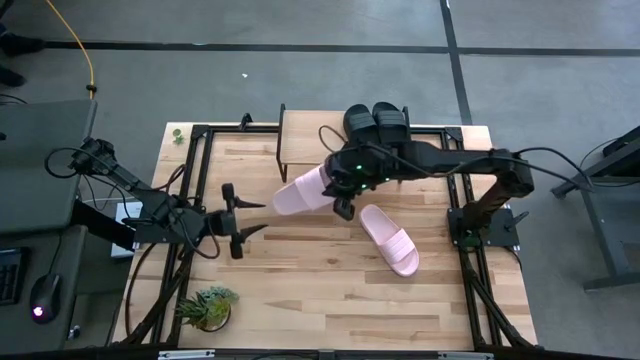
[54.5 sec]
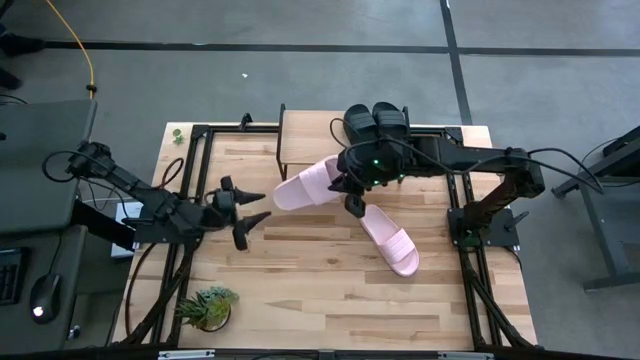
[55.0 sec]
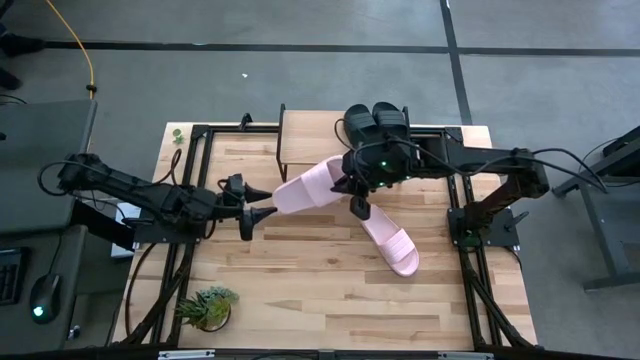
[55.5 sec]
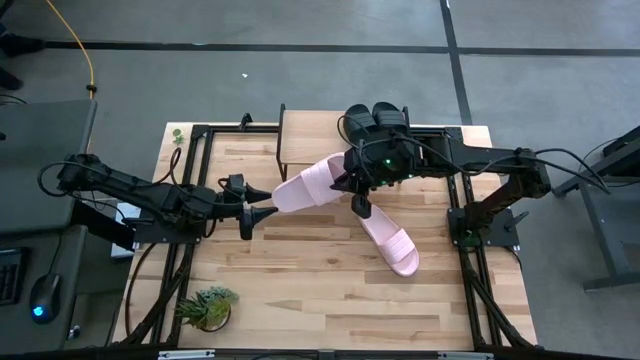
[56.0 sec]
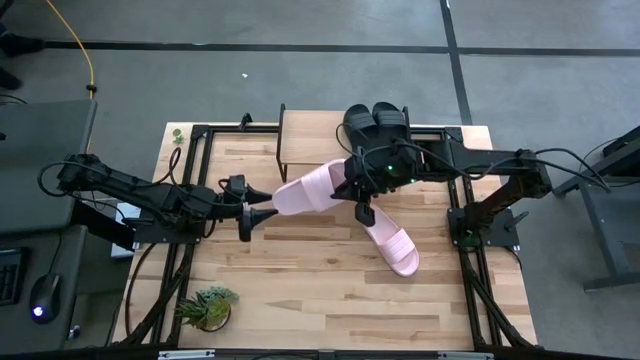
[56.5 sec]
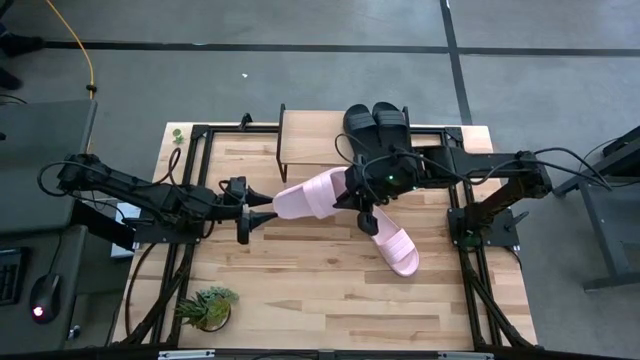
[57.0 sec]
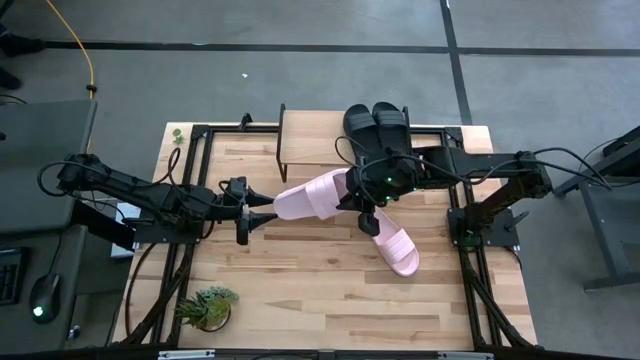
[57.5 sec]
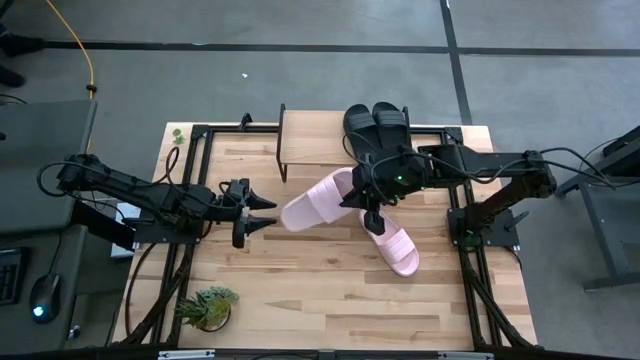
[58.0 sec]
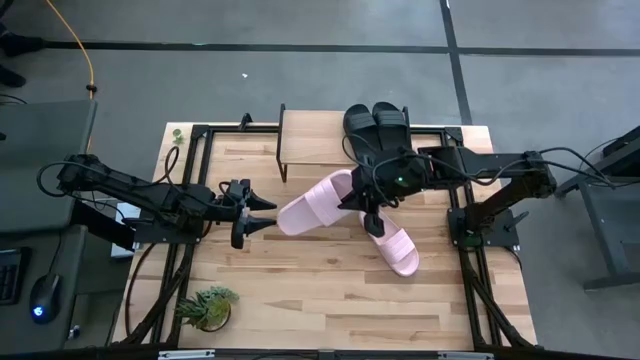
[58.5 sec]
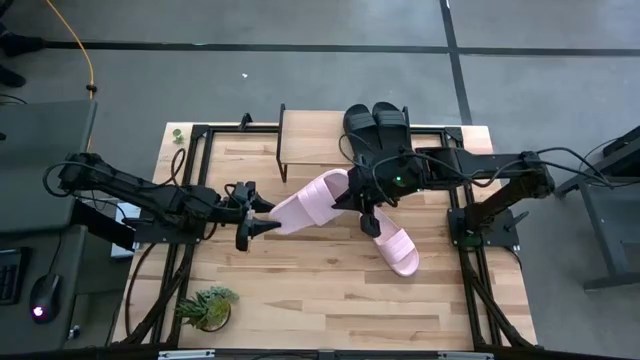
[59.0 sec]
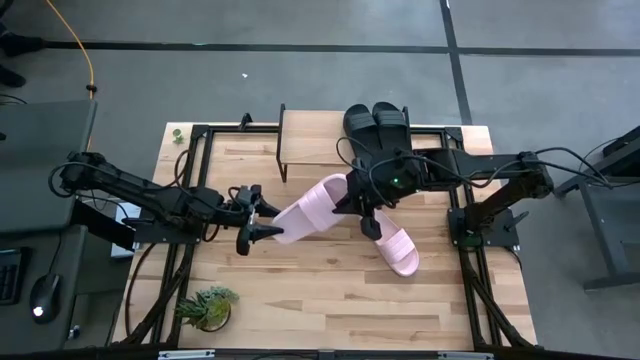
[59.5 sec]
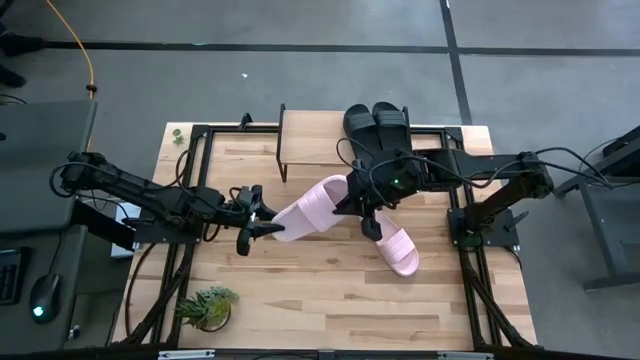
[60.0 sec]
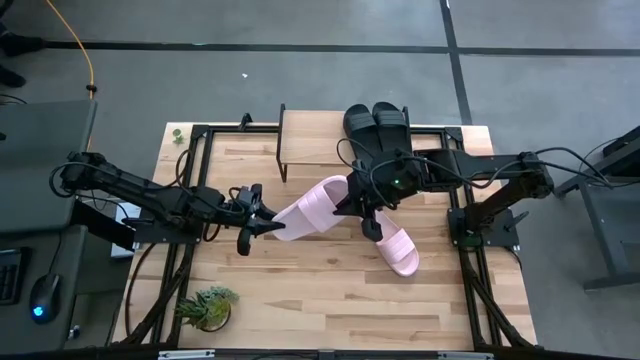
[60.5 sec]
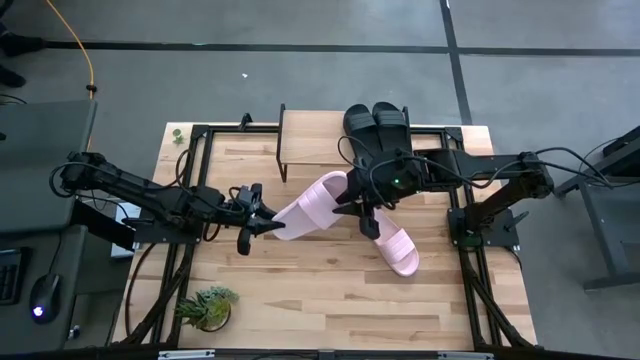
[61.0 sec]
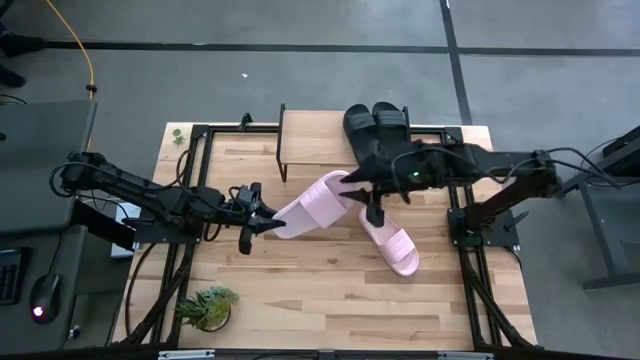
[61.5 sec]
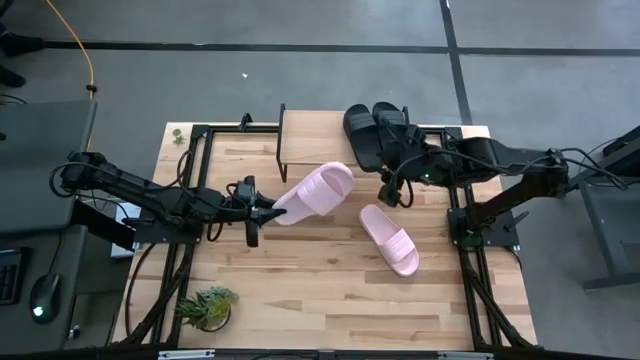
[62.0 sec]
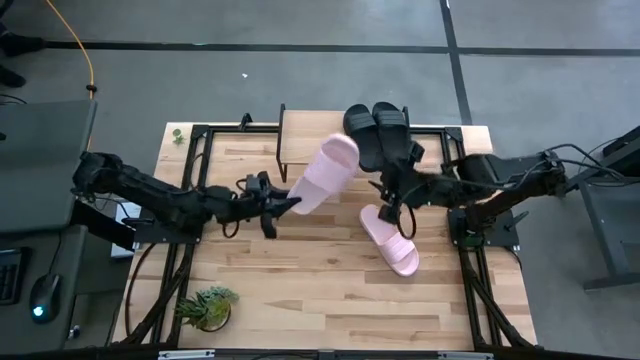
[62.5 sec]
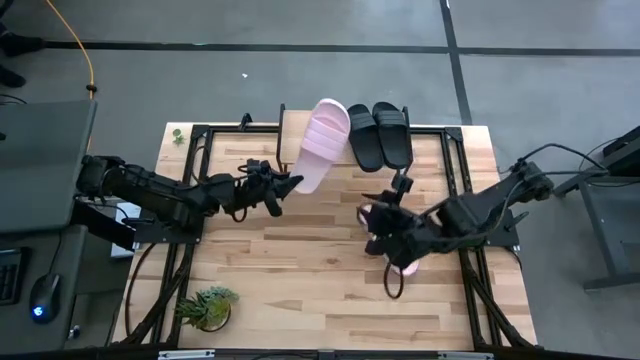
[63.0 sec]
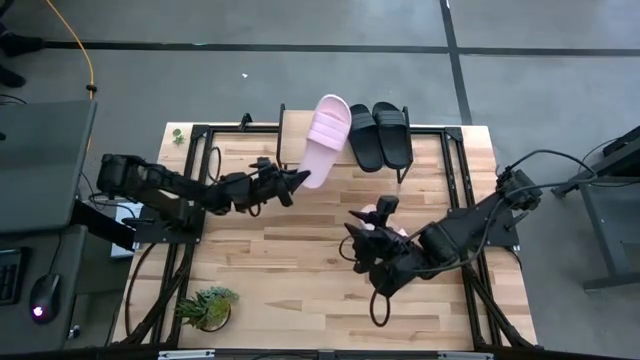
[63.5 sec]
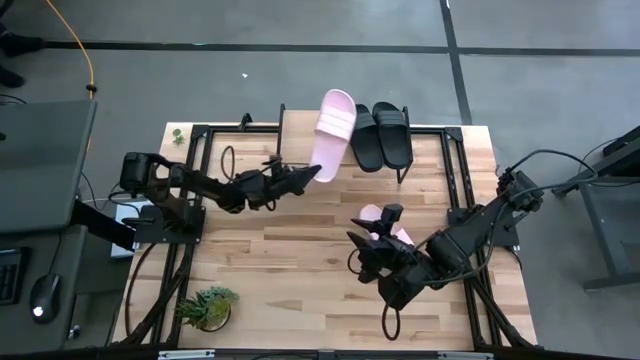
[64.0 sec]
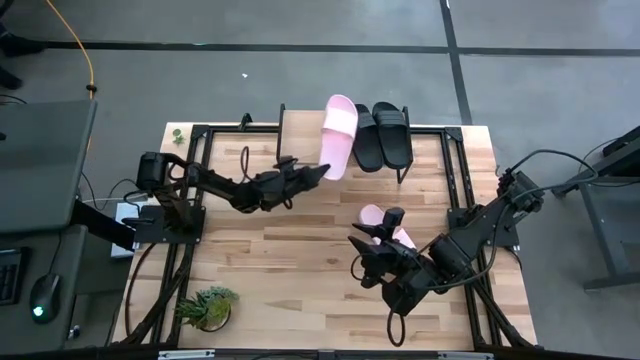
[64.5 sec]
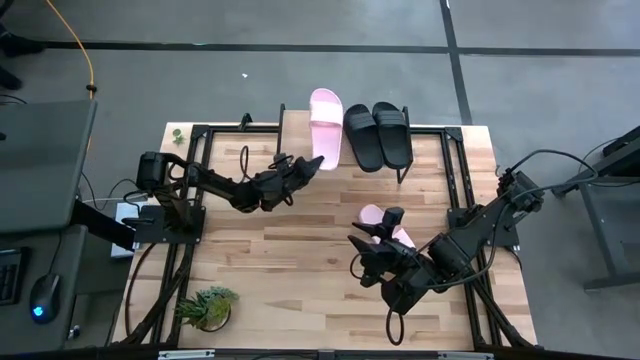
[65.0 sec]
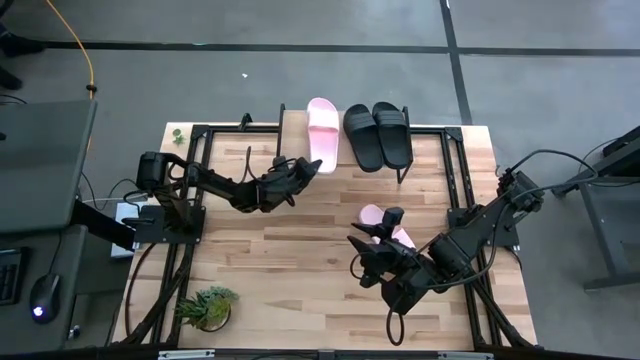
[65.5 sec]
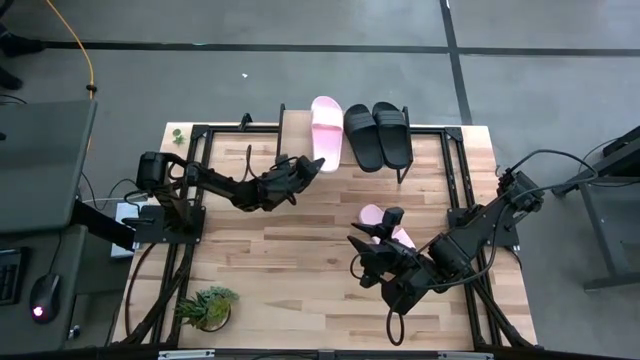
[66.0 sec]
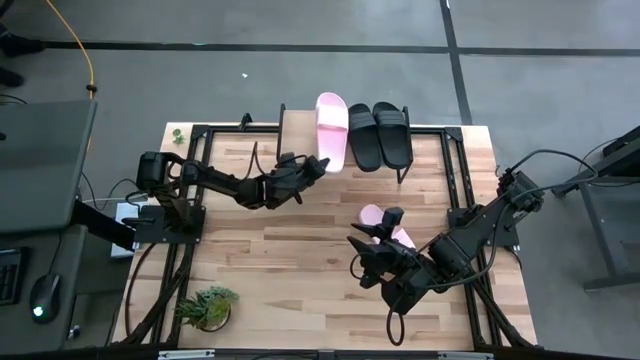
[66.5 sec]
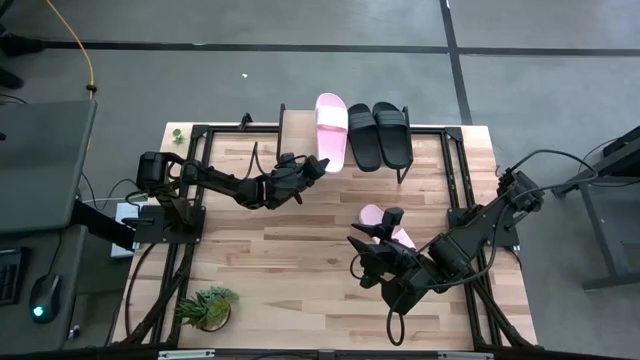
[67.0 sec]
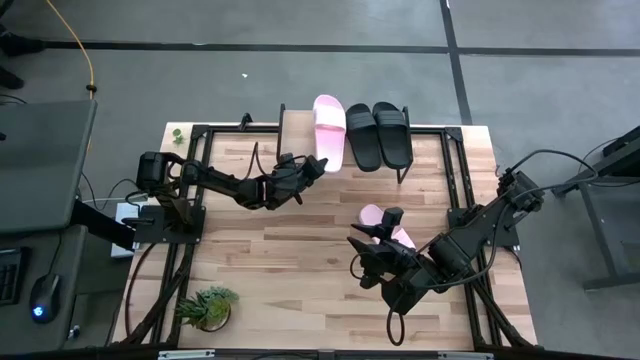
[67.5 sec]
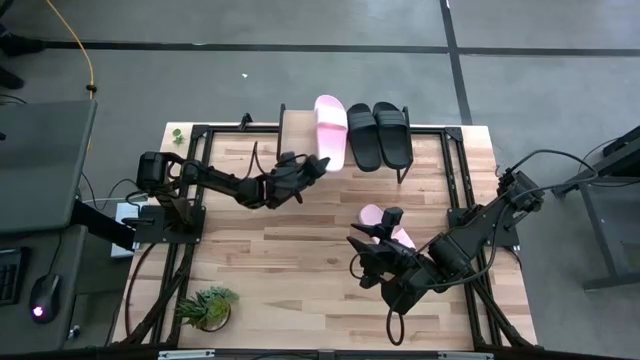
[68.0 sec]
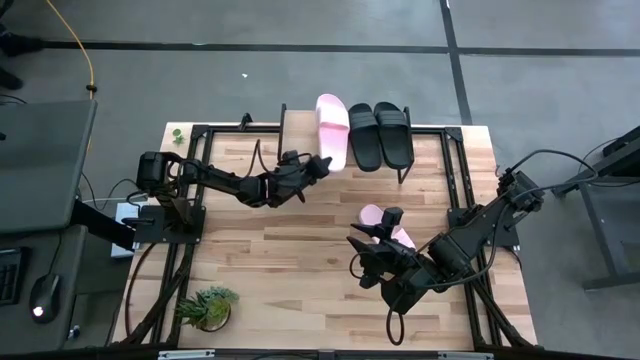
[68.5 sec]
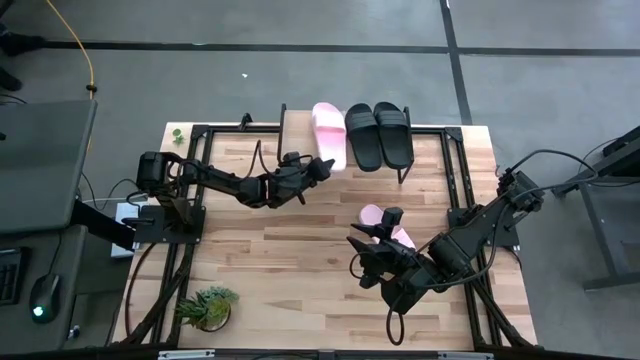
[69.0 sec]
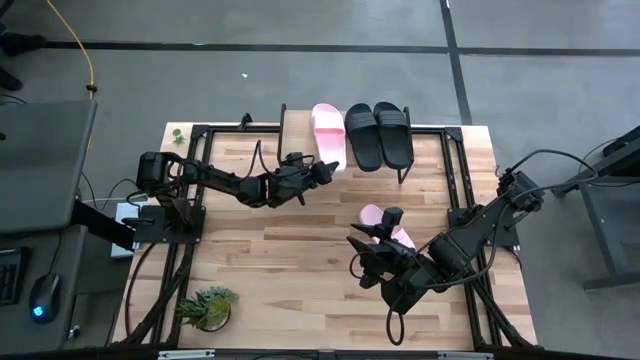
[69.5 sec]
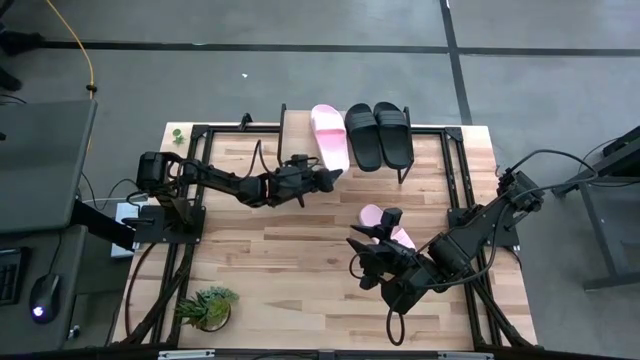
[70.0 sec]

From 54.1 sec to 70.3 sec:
Task: Pick and place slides into the shelf
Put the left pink slide on the shelf
